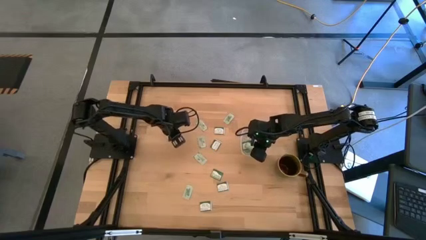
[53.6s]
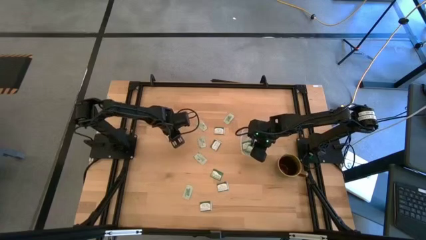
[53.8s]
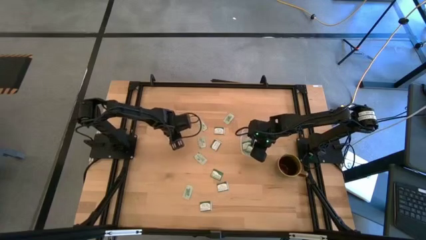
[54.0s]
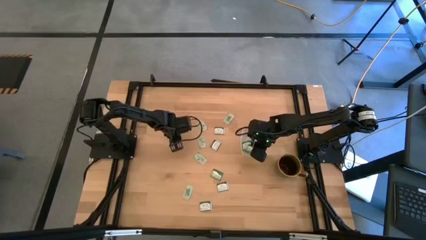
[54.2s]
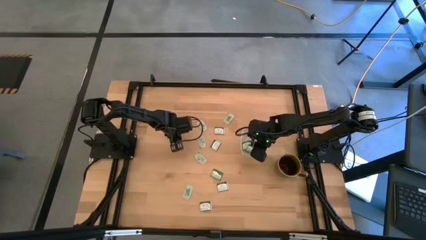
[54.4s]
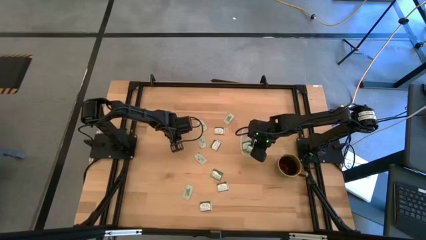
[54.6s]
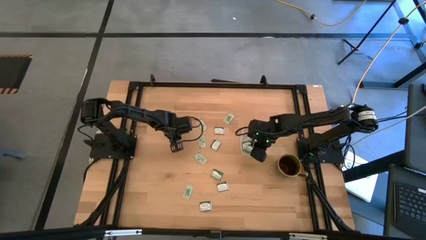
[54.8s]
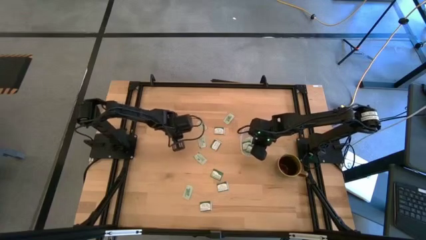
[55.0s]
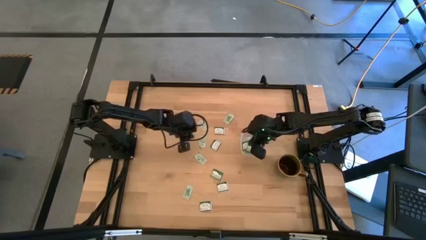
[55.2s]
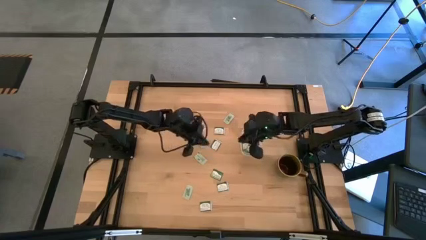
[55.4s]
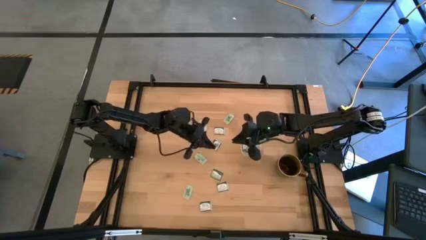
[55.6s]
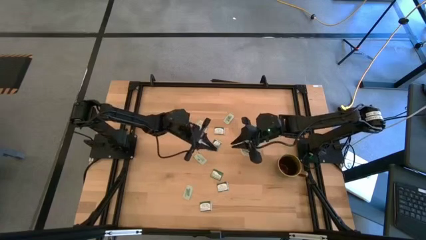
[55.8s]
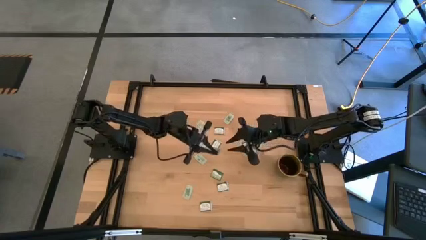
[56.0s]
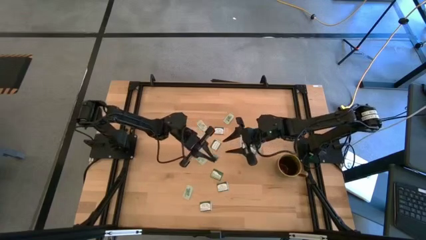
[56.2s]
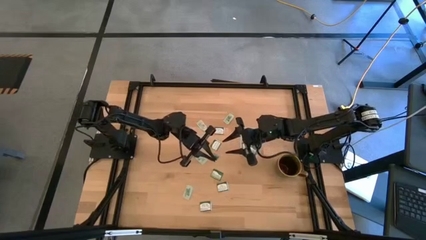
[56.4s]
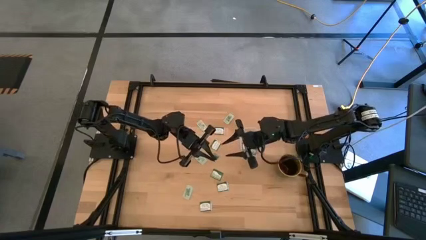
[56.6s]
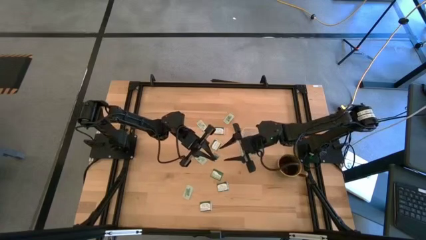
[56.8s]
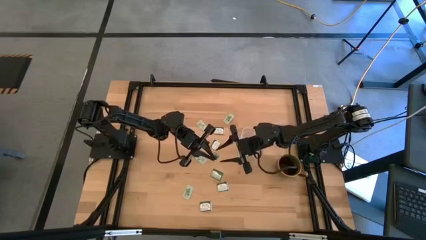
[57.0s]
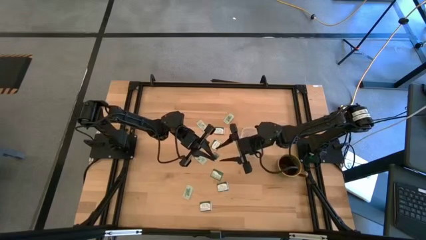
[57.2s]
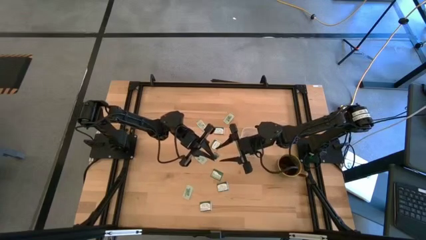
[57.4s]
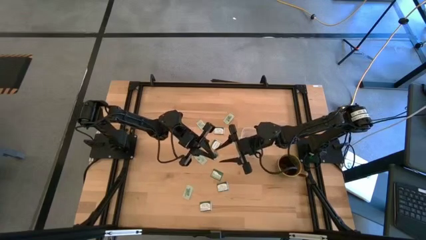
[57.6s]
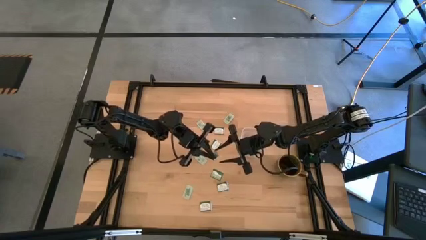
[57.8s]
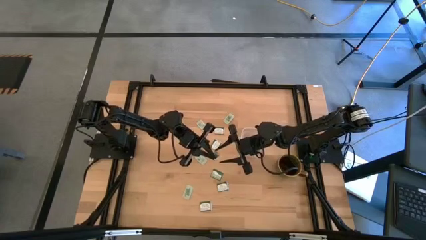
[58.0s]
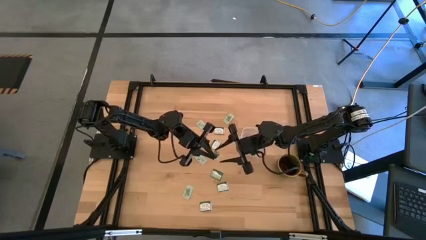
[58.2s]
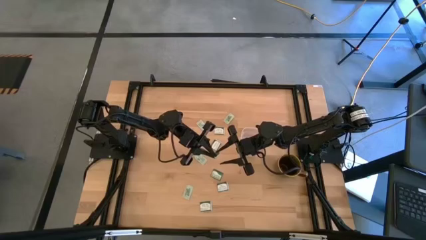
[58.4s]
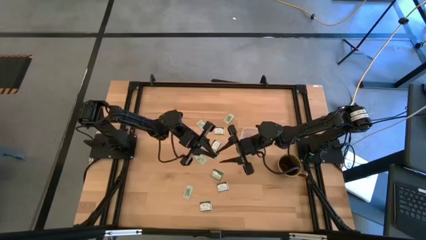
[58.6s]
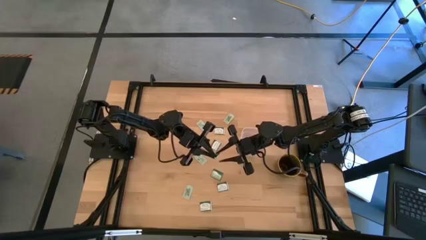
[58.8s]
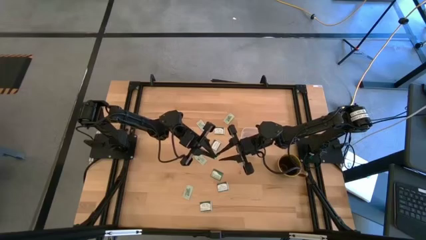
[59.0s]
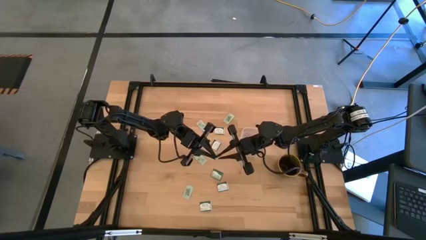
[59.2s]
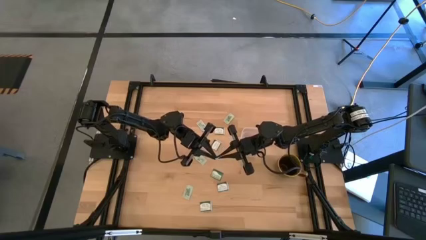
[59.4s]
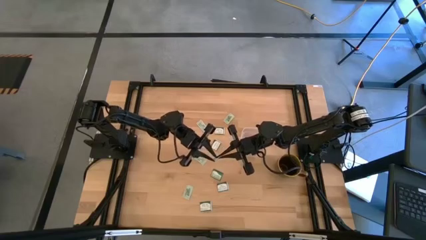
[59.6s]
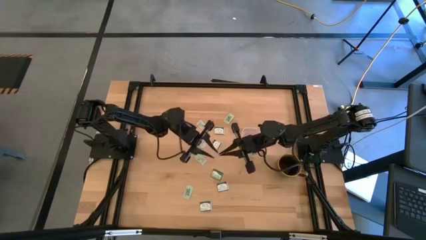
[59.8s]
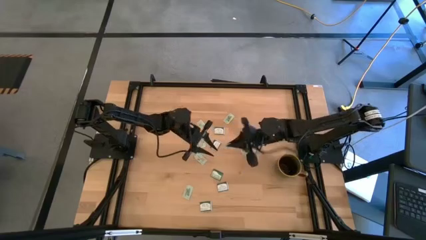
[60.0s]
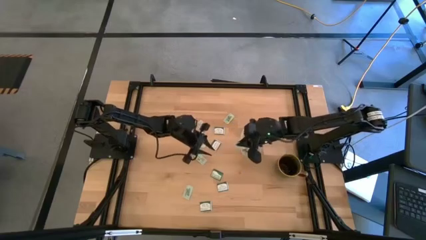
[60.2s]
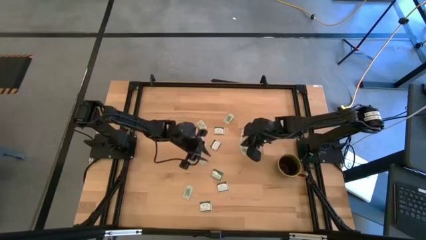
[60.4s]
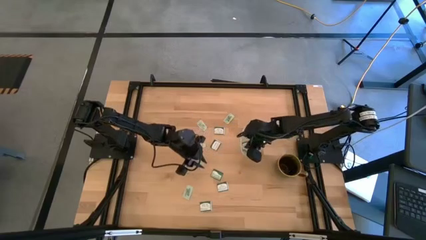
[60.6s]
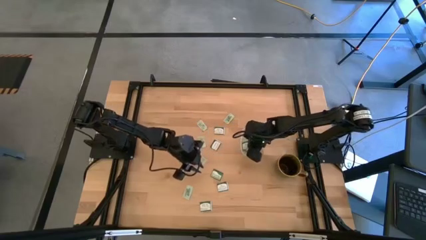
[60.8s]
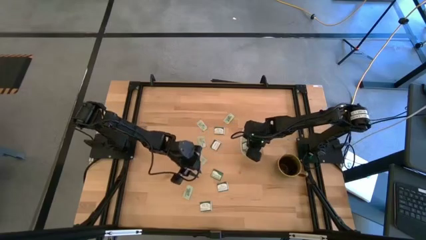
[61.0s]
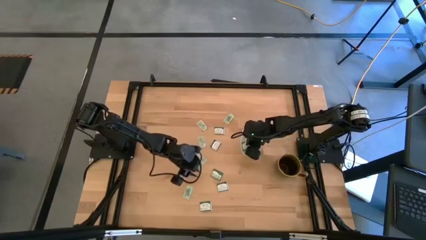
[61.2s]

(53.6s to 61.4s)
Task: Pick and place items into bin
Put the stevia packet into the transparent bin

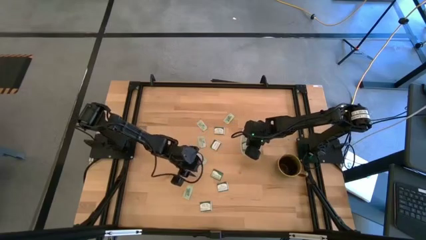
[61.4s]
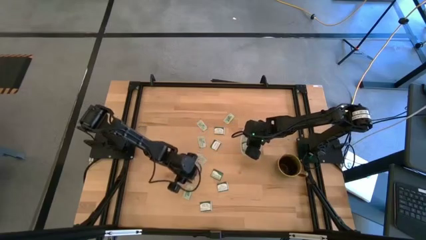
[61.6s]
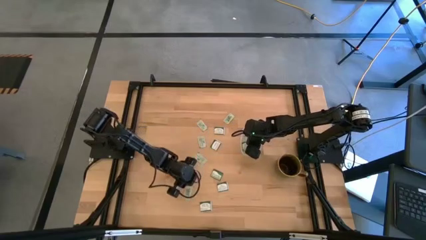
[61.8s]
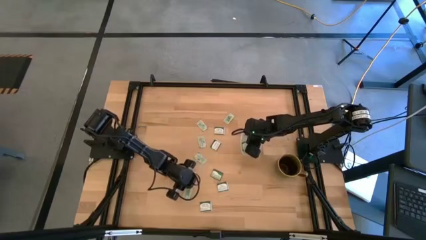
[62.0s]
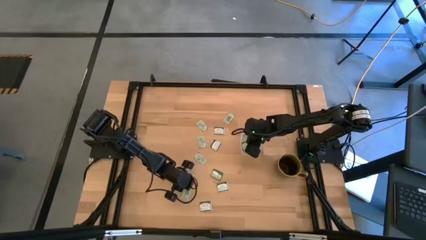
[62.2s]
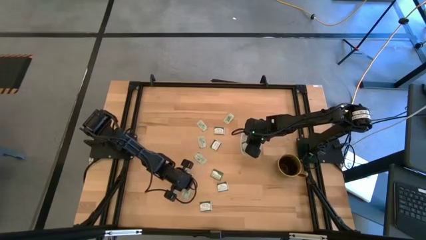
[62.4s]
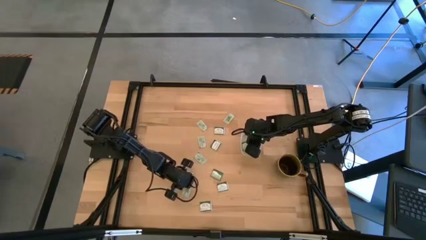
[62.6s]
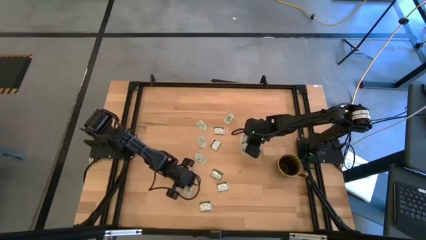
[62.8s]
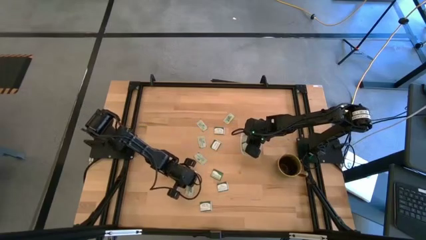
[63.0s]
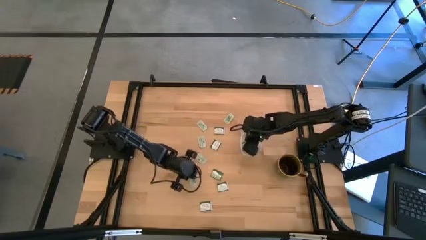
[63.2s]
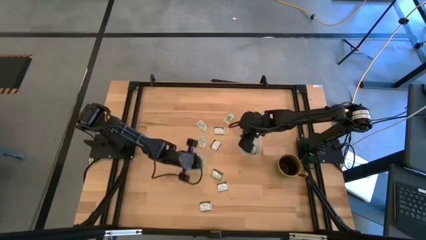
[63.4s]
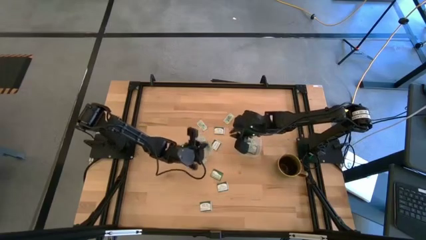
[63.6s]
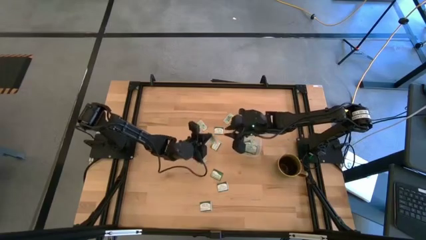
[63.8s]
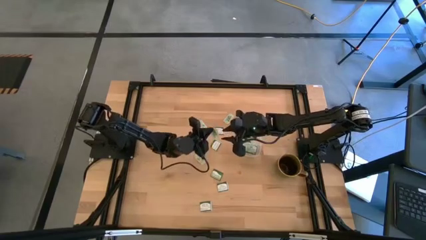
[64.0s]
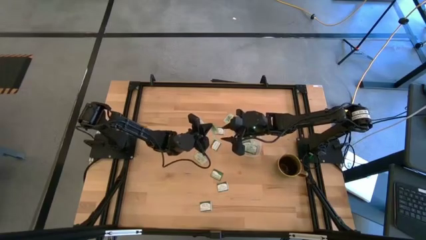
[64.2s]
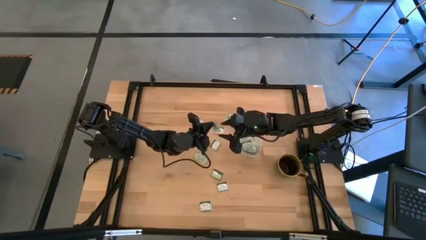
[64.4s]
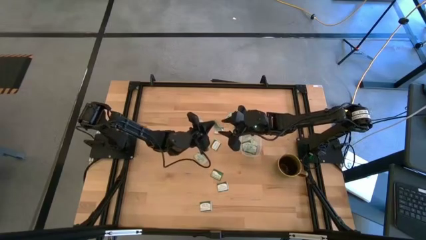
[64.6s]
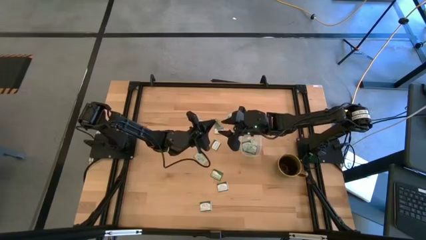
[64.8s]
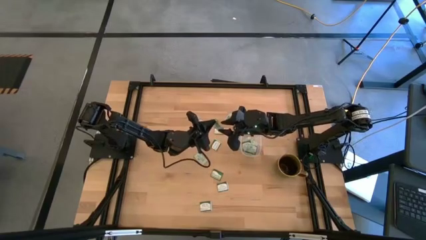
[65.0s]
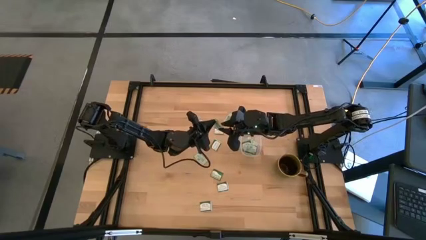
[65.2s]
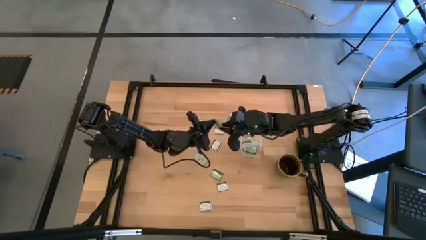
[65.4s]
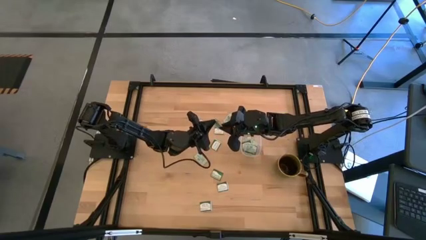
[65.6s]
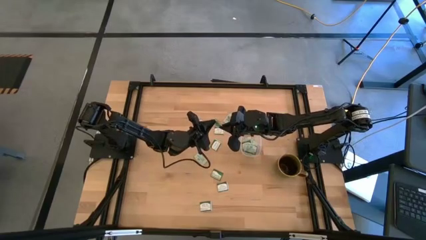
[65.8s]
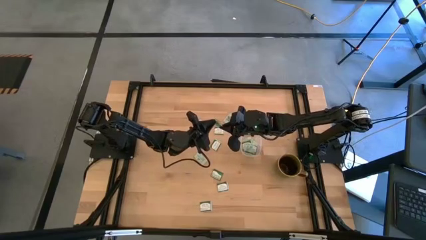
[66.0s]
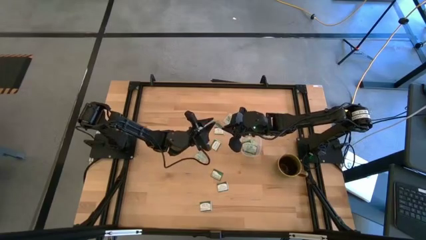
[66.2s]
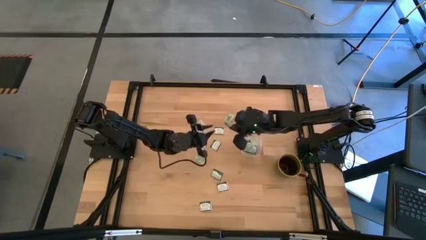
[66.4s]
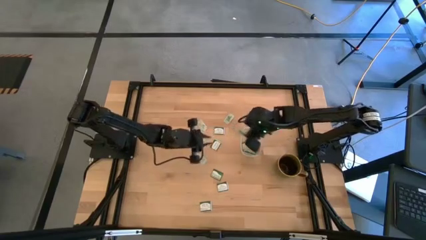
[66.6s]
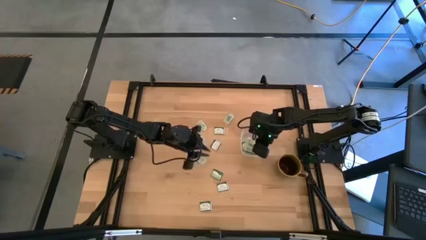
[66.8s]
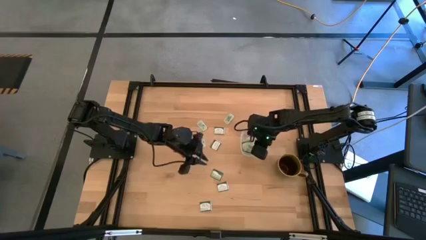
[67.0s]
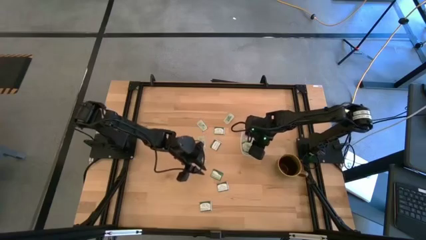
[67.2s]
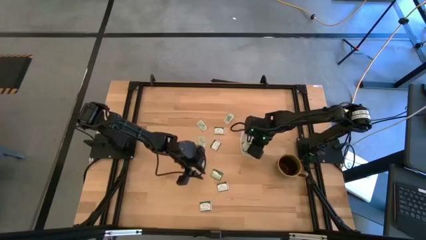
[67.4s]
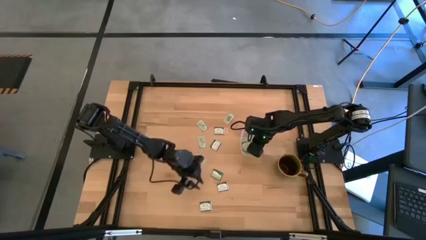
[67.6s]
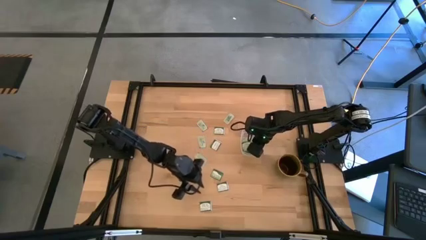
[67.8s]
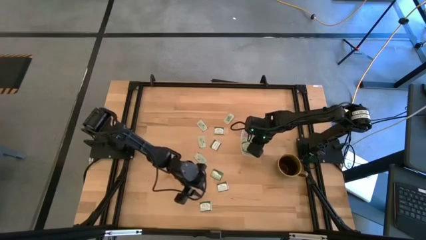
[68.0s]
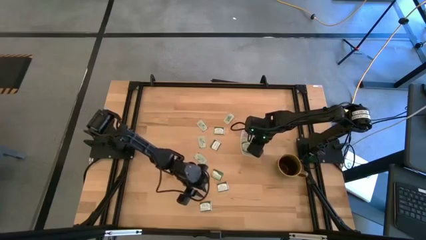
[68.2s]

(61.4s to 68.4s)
Put the stevia packet into the transparent bin

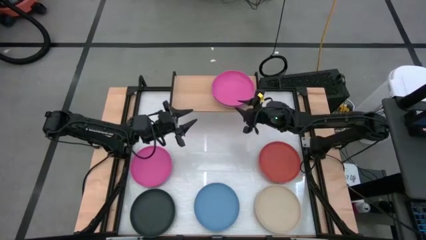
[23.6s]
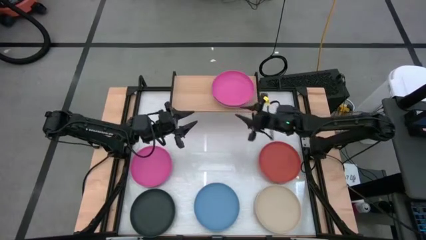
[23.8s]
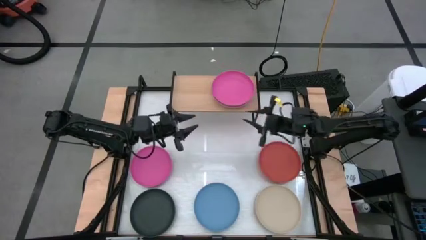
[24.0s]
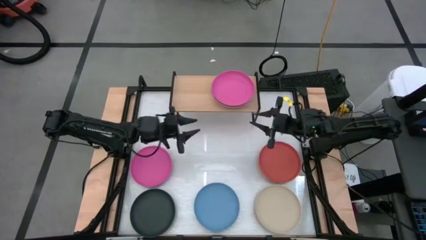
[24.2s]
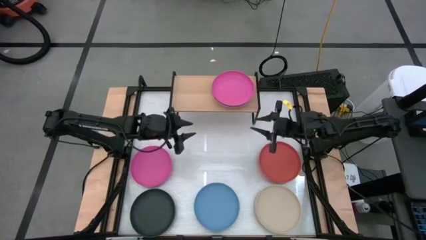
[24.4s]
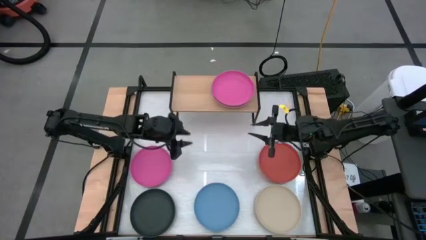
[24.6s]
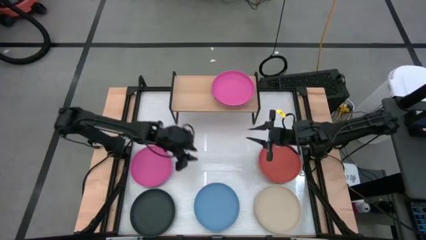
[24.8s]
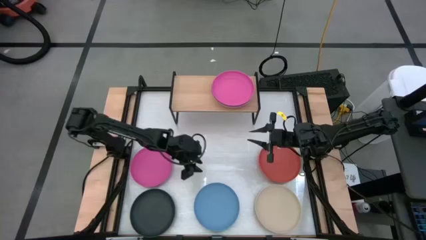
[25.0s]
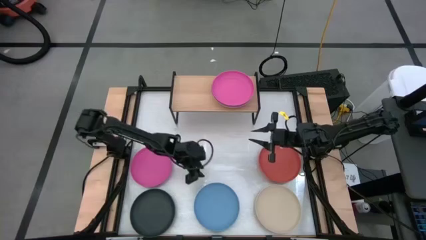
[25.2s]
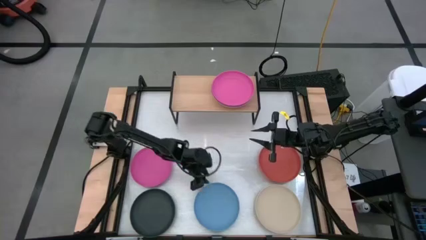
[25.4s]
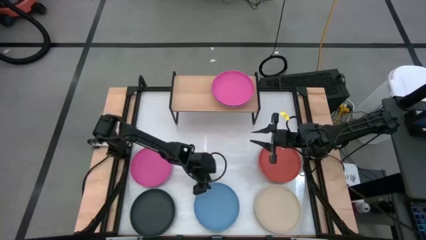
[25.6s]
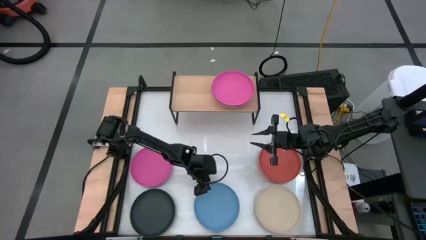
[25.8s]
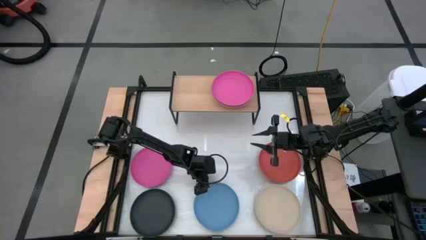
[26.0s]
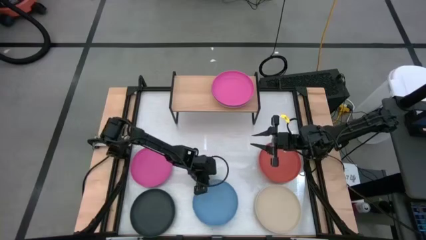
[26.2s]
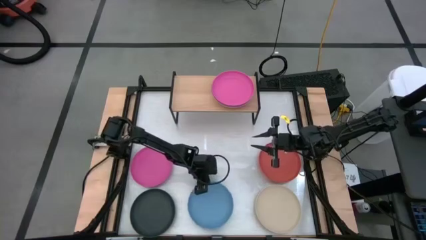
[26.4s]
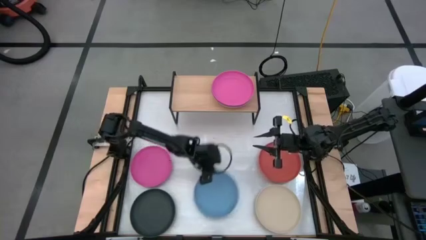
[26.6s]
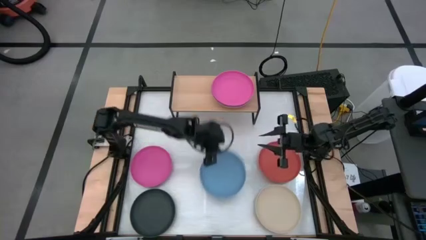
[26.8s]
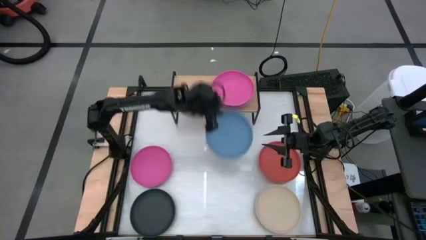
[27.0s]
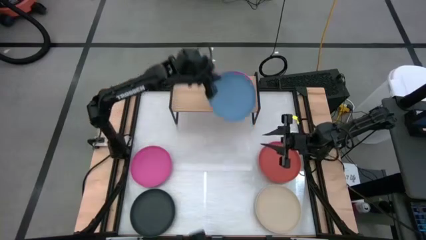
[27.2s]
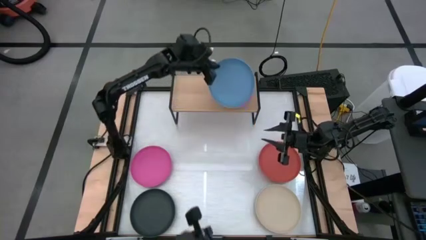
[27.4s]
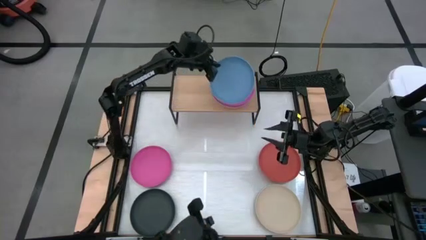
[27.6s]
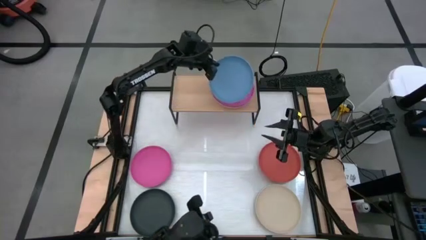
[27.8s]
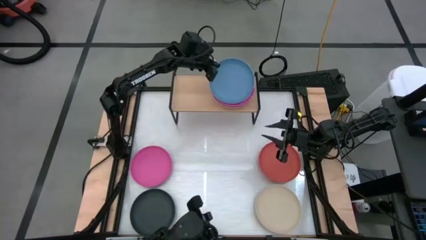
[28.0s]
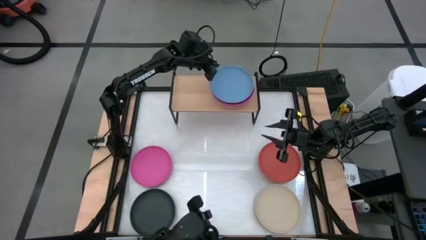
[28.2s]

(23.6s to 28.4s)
Task: Place and stack plates onto a shelf
Stack the blue plate on top of the pink plate
